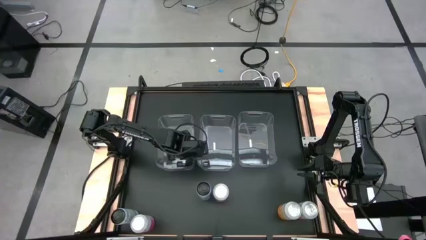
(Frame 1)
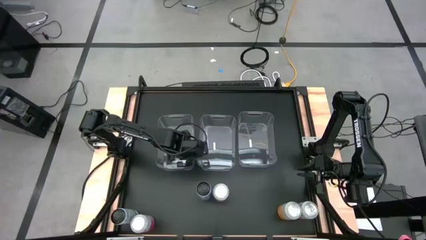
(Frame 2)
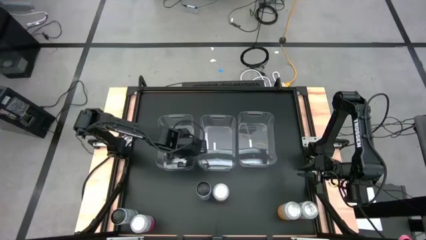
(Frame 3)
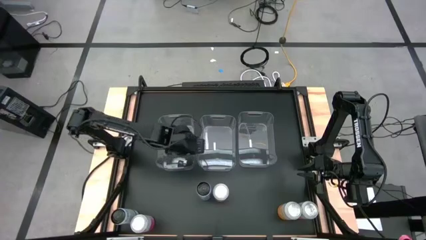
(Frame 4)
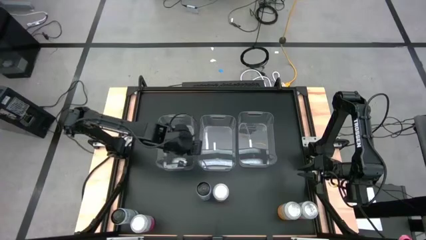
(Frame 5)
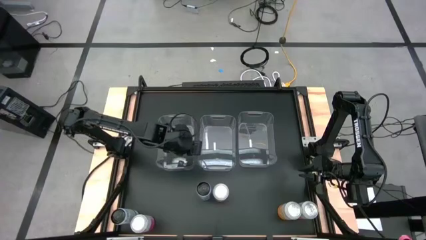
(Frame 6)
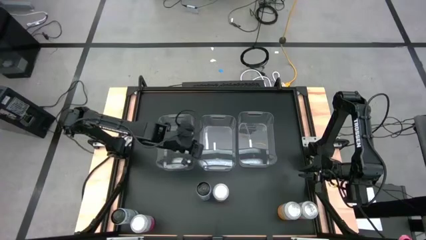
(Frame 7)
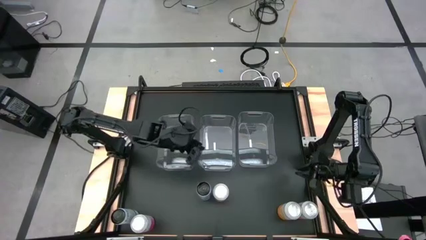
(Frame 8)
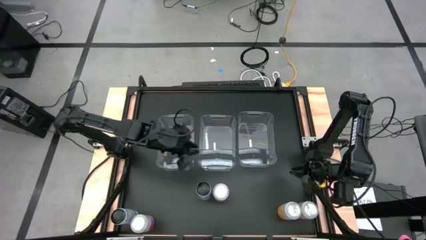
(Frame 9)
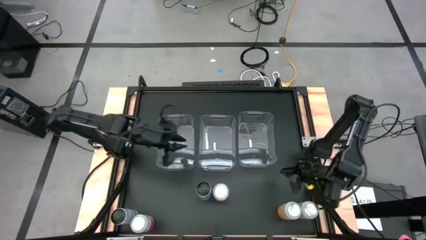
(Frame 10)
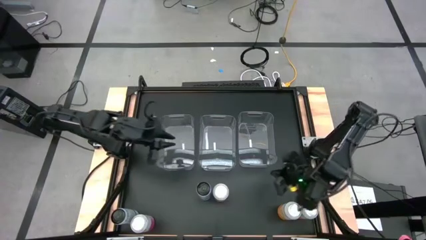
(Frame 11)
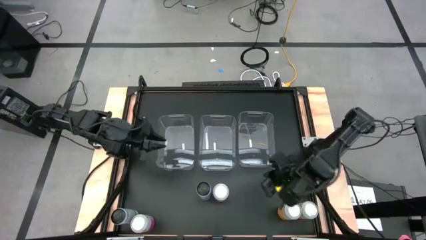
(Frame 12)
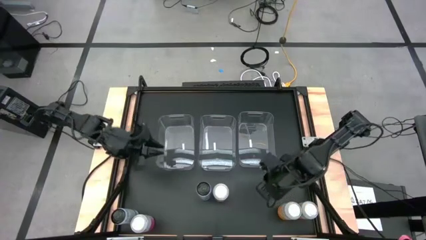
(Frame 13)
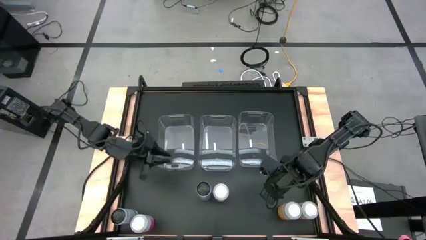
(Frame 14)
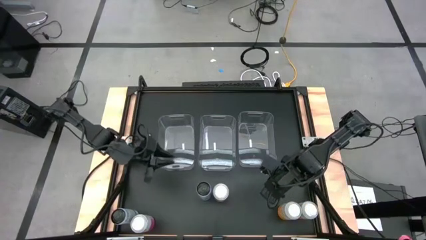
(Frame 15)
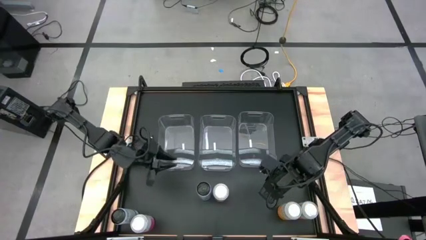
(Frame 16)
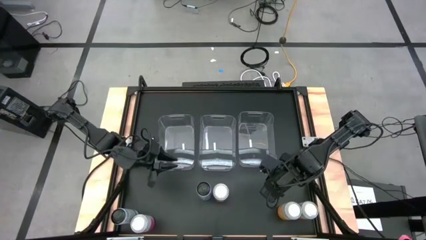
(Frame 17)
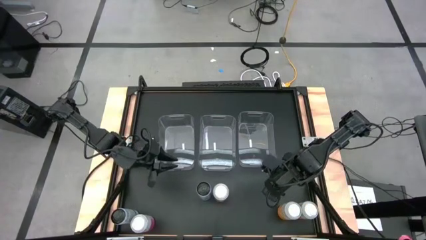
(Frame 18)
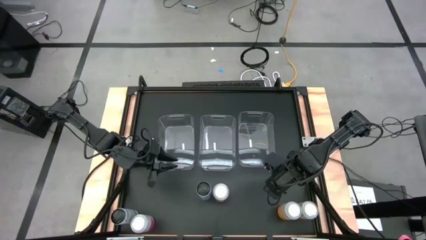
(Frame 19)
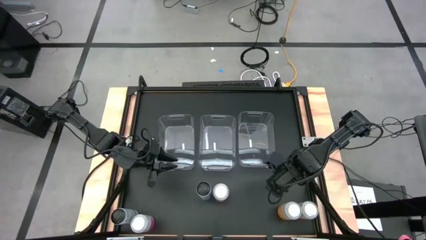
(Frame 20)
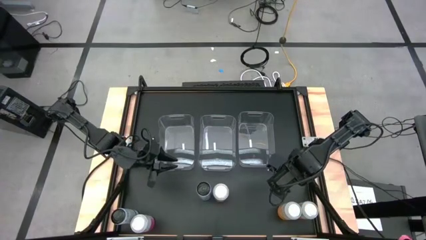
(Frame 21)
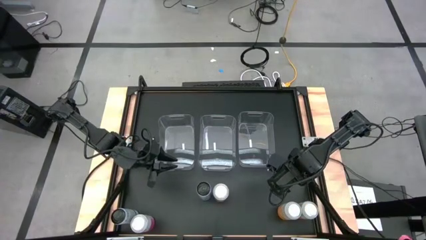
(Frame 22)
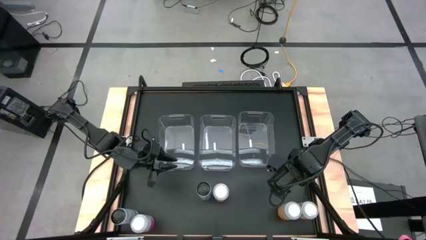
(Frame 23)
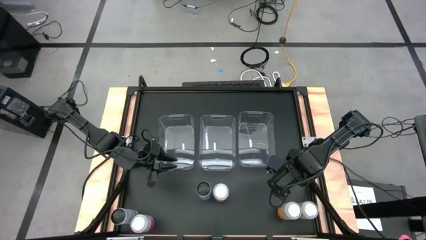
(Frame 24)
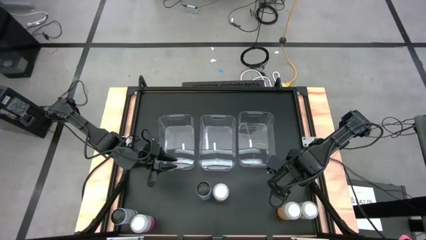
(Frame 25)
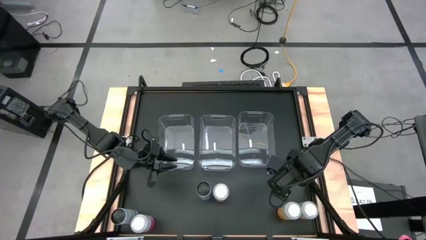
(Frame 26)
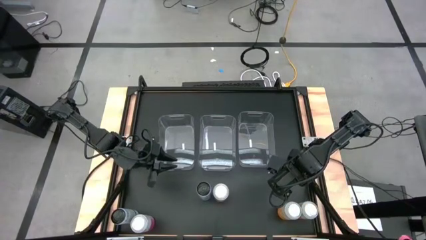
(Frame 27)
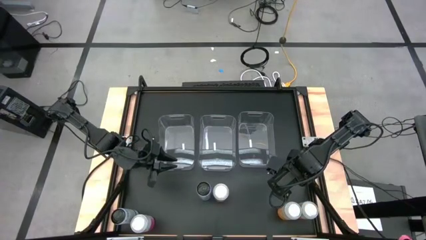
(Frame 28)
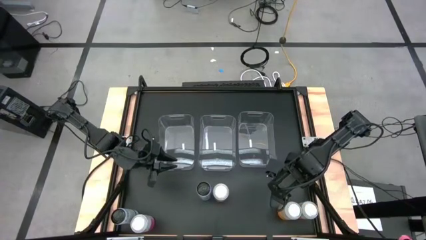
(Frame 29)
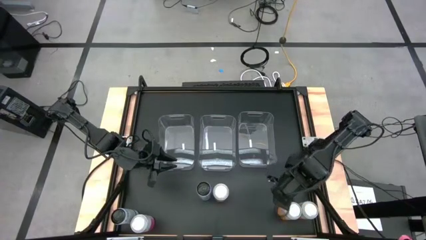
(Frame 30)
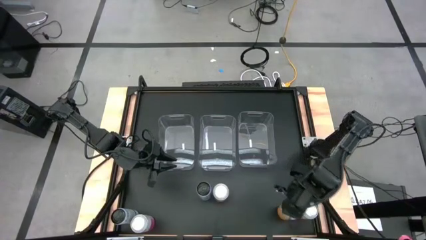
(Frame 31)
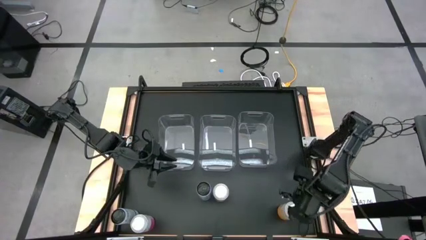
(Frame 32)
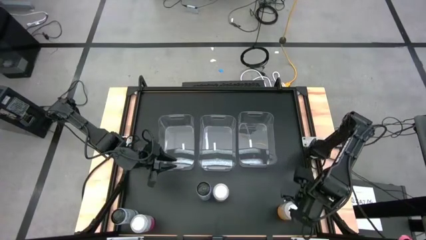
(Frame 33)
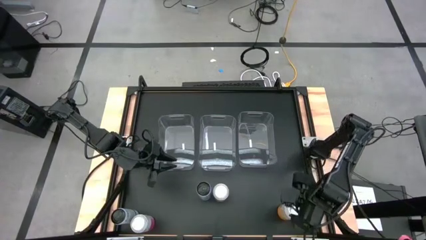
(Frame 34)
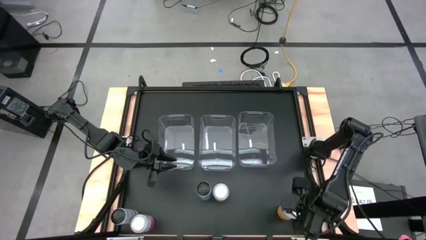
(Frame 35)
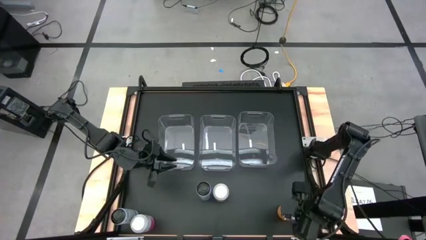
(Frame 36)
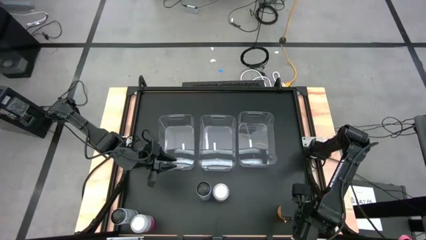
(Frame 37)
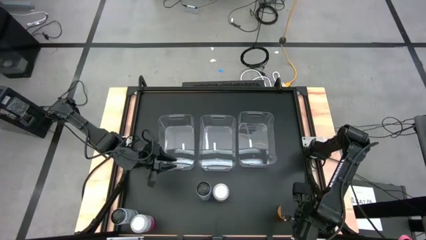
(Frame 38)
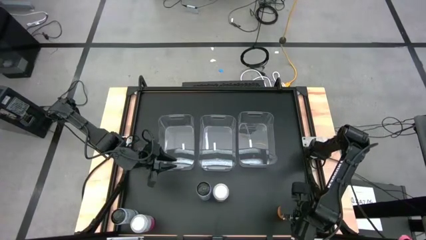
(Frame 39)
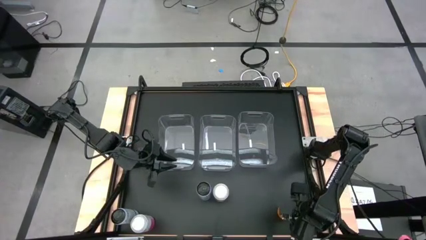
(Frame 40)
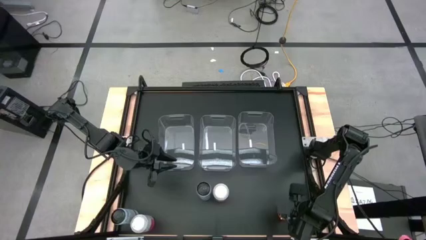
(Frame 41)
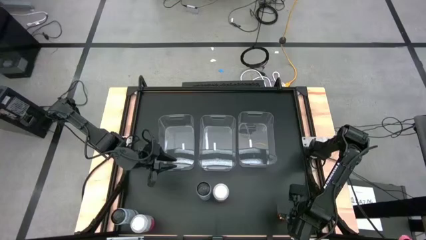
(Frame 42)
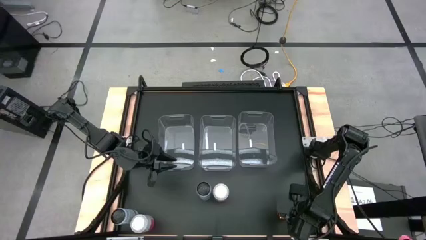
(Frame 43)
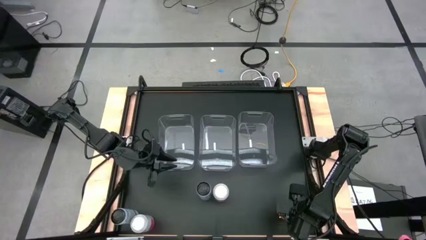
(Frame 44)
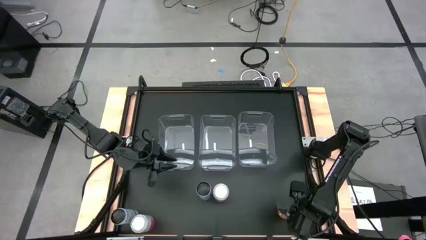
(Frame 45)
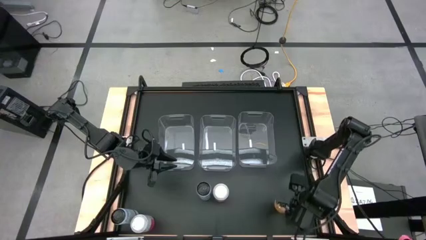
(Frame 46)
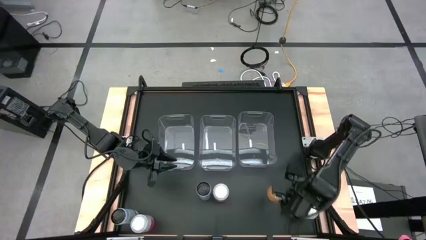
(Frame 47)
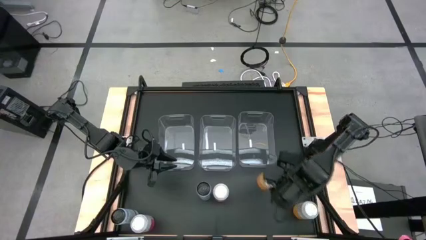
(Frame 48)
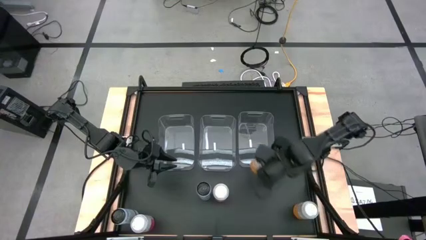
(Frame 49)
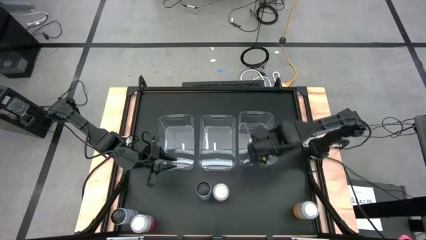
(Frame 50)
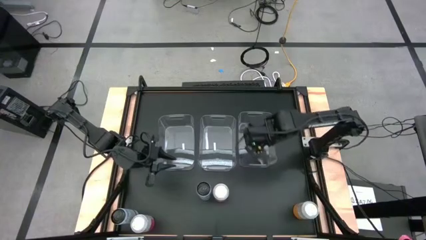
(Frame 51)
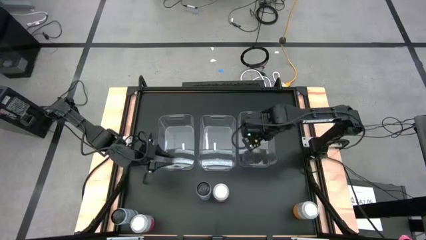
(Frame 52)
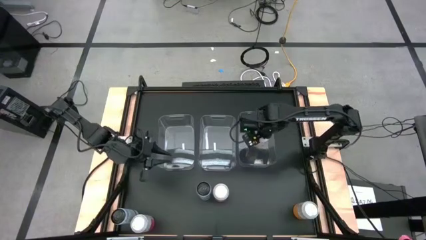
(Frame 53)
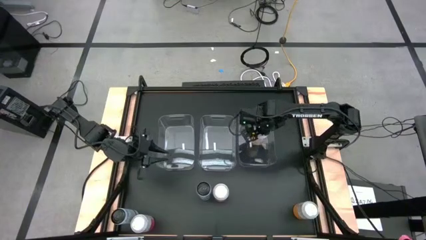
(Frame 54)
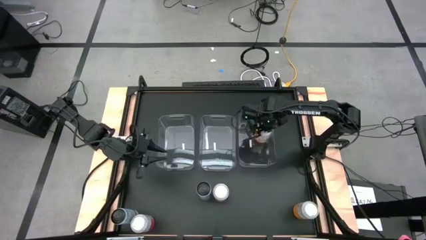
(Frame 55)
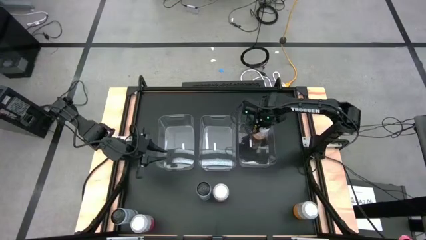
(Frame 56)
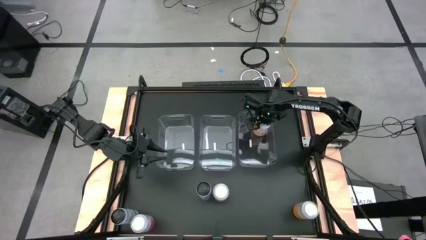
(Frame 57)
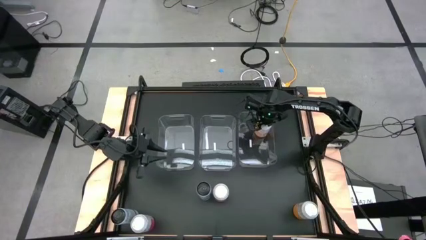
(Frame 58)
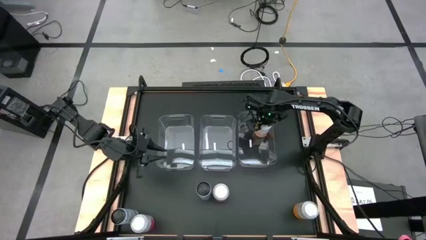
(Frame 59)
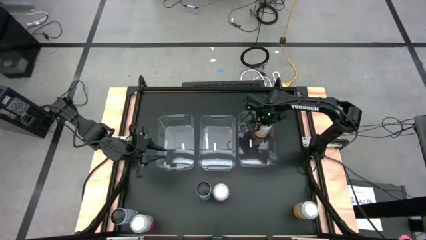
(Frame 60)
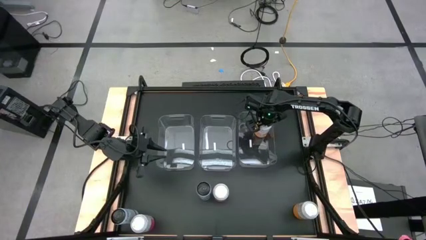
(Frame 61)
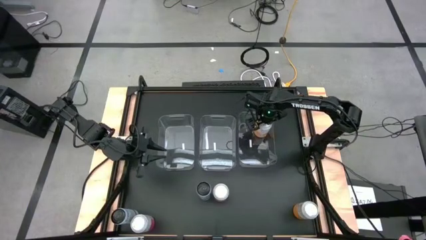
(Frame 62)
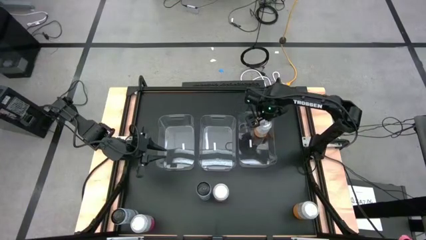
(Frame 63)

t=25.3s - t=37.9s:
Task: Sort soda cans
Put the left orange-white soda can into the right transparent bin
